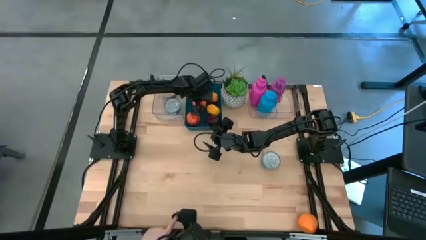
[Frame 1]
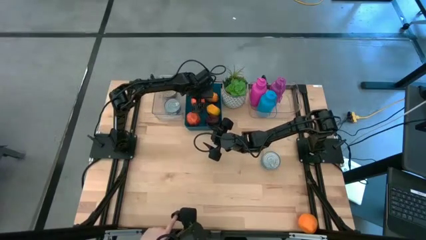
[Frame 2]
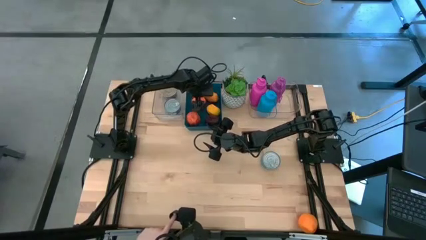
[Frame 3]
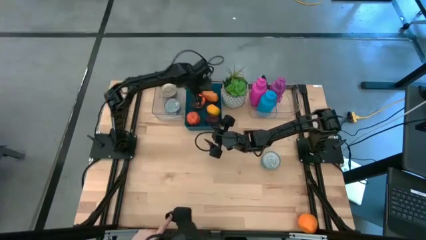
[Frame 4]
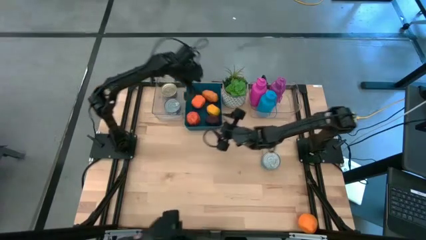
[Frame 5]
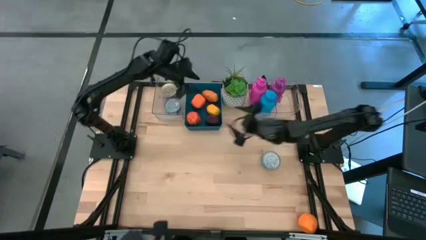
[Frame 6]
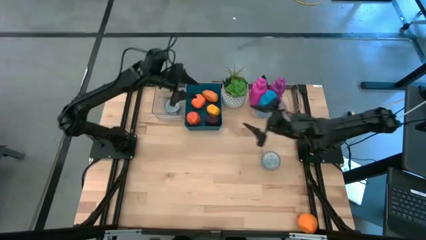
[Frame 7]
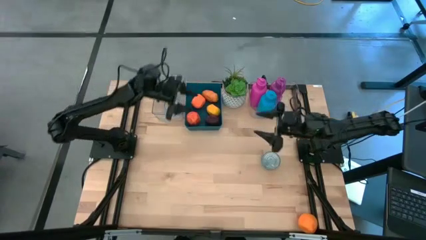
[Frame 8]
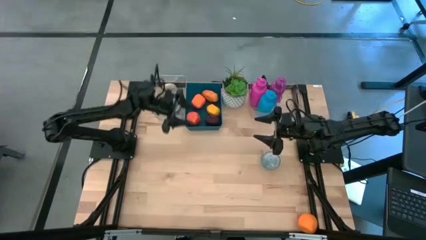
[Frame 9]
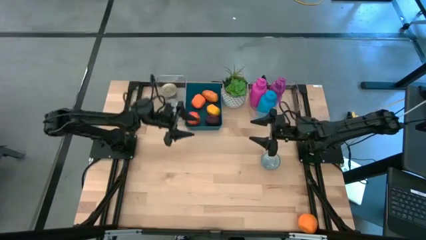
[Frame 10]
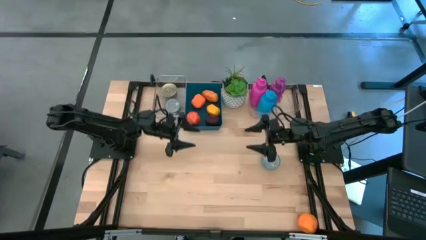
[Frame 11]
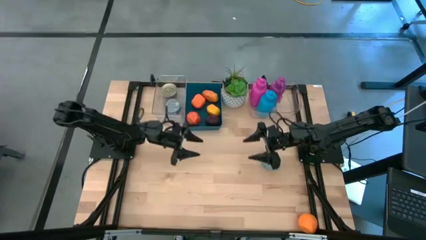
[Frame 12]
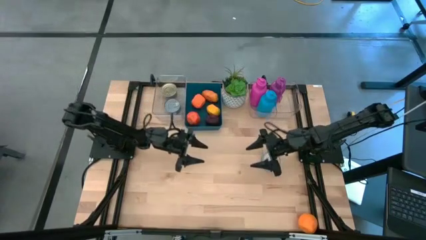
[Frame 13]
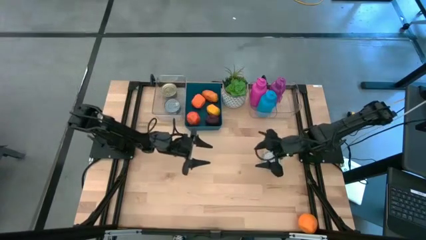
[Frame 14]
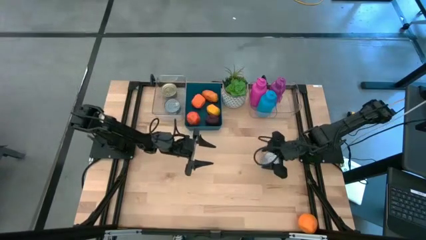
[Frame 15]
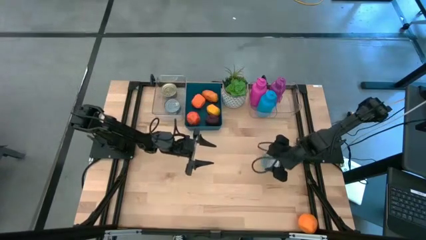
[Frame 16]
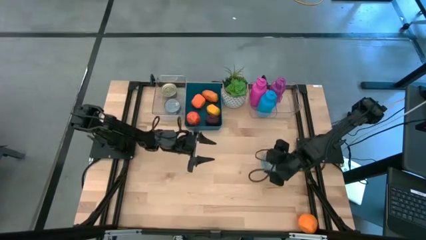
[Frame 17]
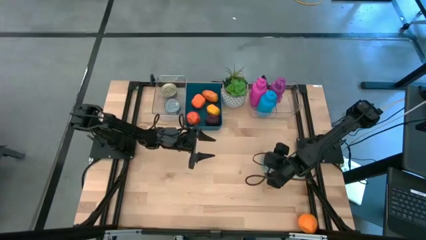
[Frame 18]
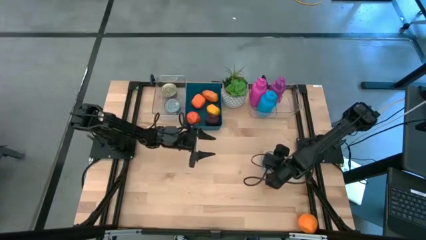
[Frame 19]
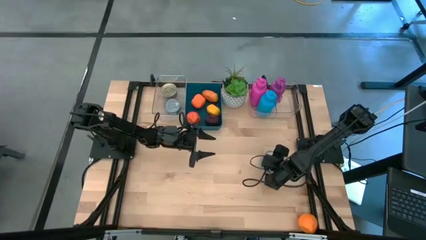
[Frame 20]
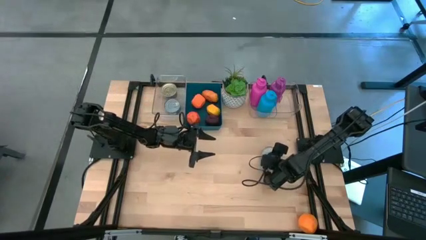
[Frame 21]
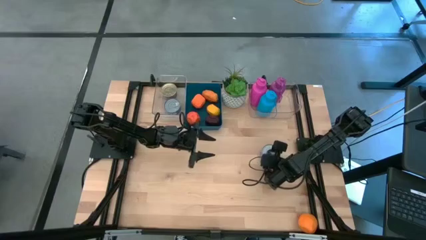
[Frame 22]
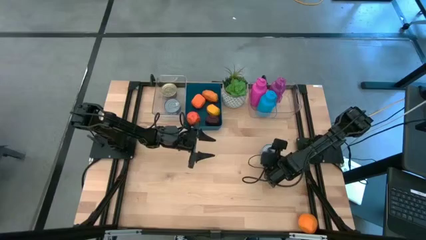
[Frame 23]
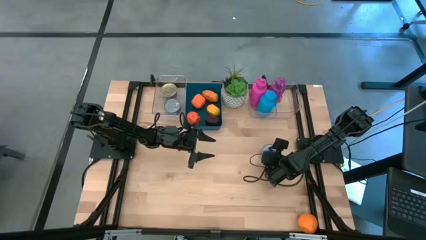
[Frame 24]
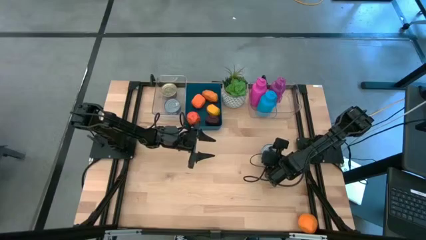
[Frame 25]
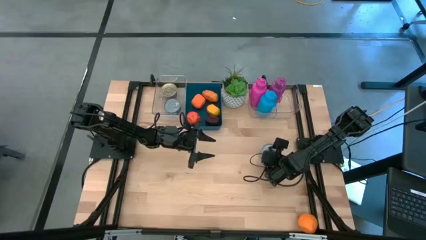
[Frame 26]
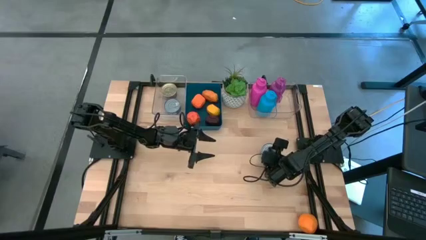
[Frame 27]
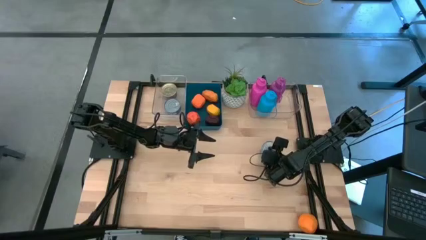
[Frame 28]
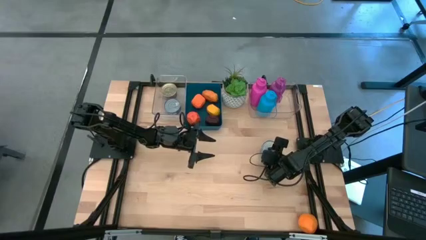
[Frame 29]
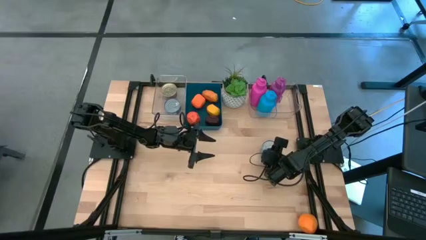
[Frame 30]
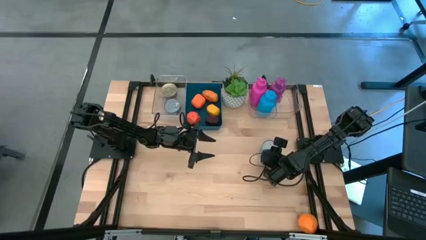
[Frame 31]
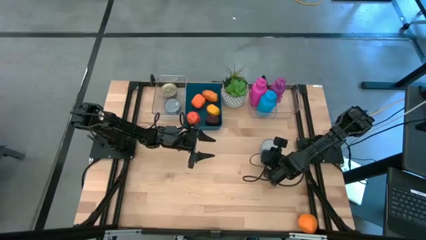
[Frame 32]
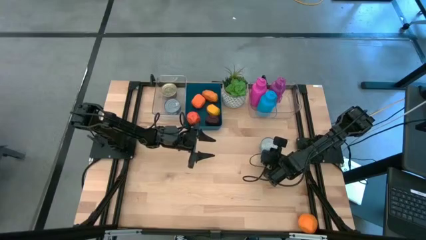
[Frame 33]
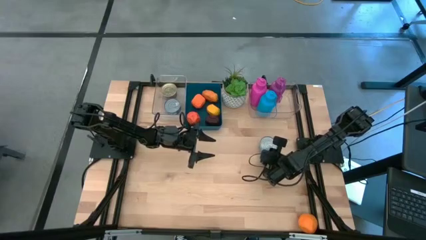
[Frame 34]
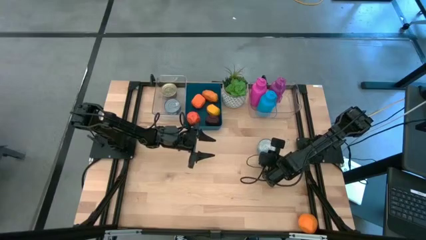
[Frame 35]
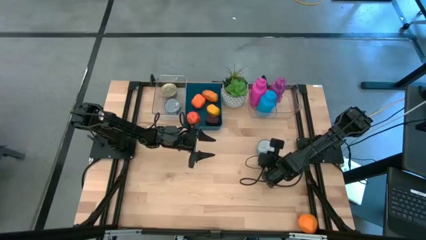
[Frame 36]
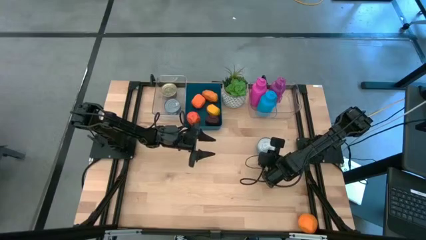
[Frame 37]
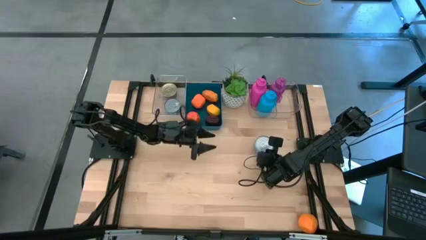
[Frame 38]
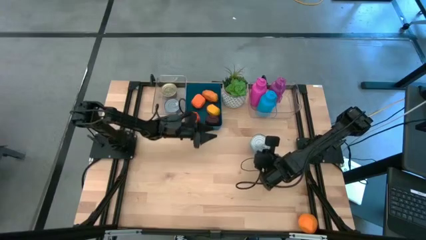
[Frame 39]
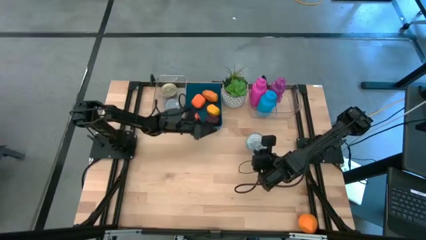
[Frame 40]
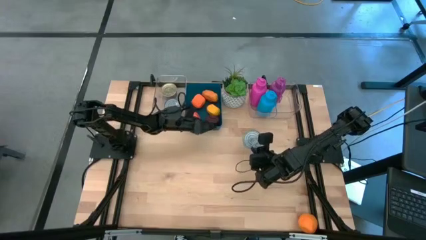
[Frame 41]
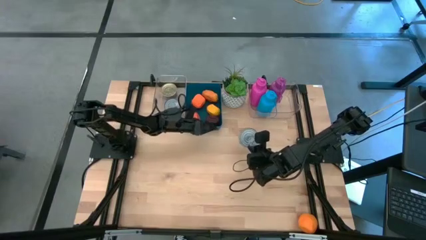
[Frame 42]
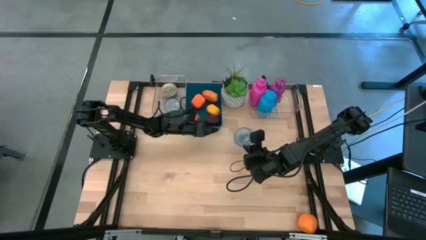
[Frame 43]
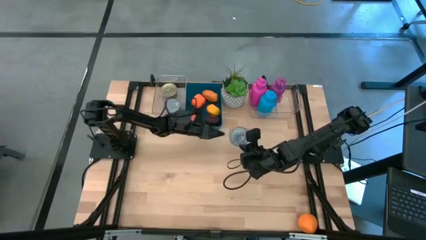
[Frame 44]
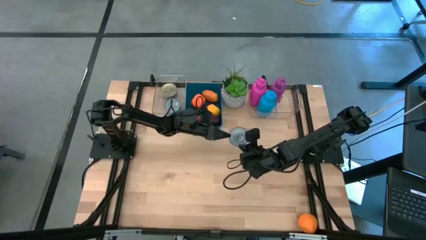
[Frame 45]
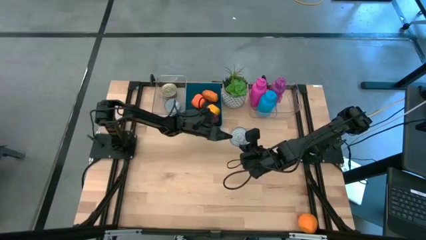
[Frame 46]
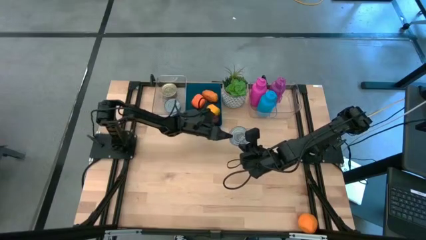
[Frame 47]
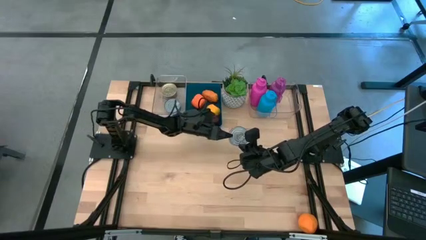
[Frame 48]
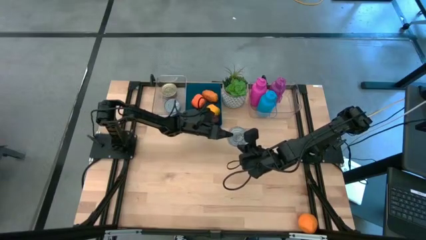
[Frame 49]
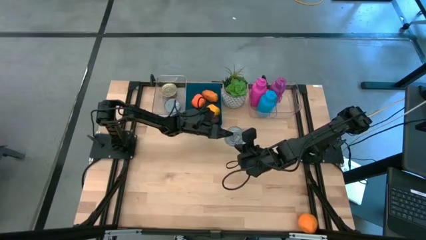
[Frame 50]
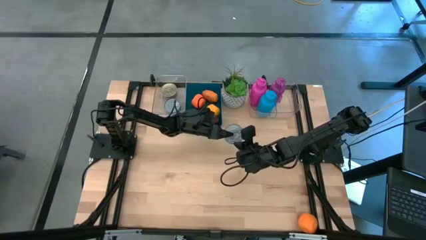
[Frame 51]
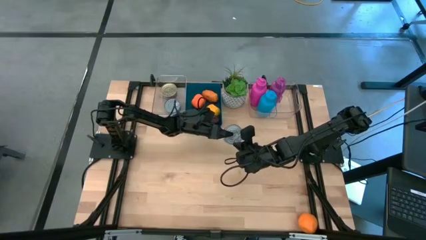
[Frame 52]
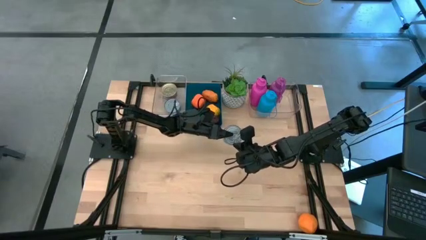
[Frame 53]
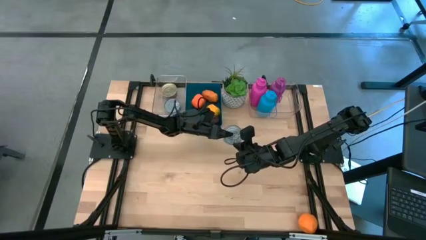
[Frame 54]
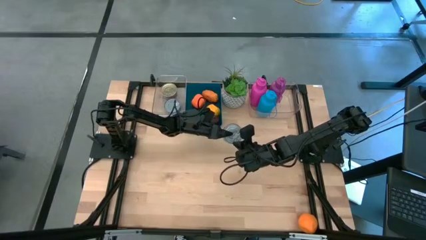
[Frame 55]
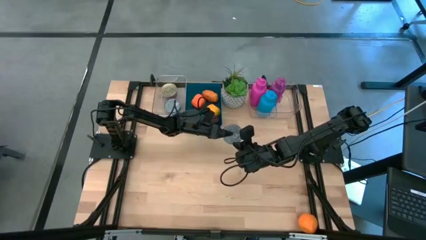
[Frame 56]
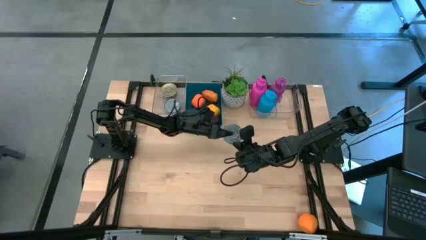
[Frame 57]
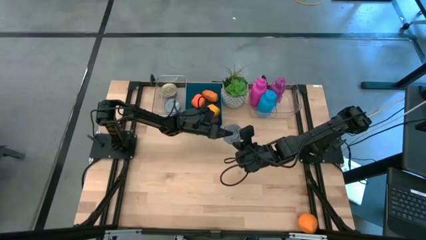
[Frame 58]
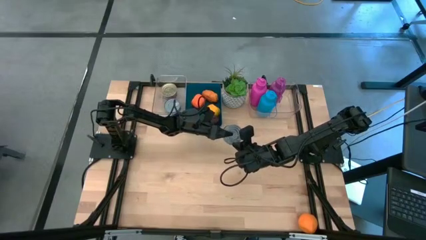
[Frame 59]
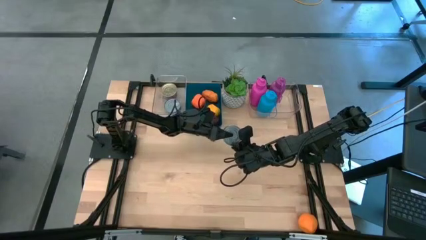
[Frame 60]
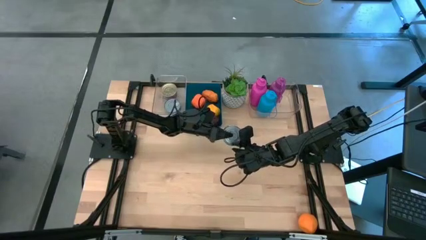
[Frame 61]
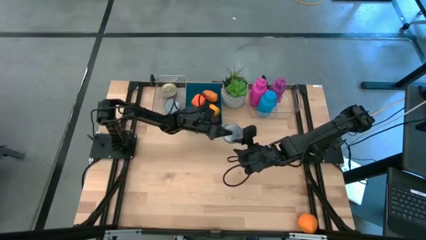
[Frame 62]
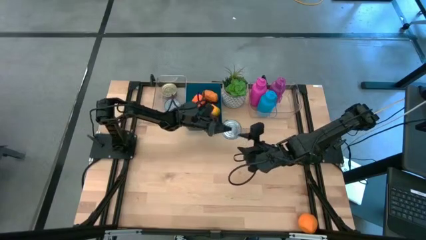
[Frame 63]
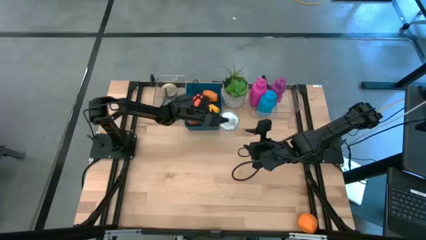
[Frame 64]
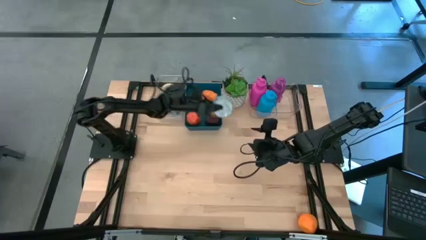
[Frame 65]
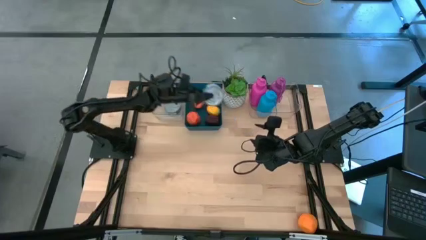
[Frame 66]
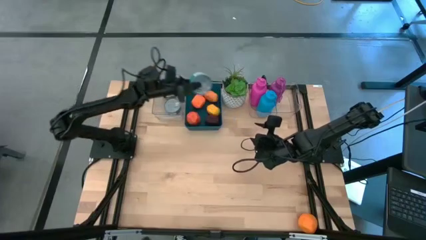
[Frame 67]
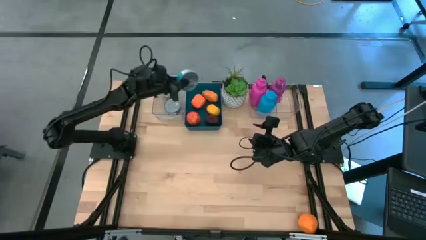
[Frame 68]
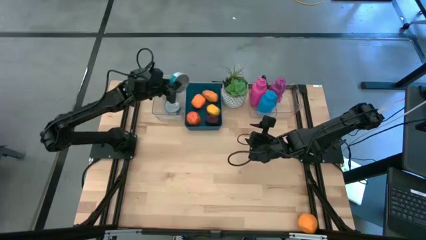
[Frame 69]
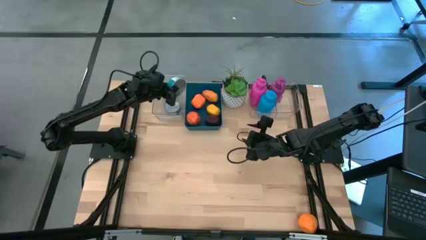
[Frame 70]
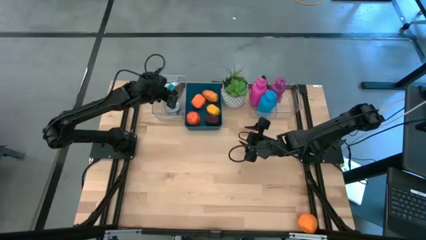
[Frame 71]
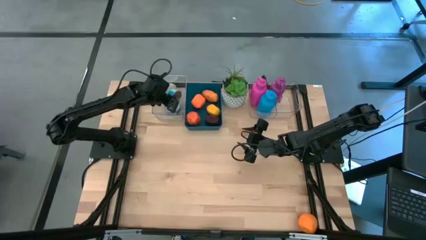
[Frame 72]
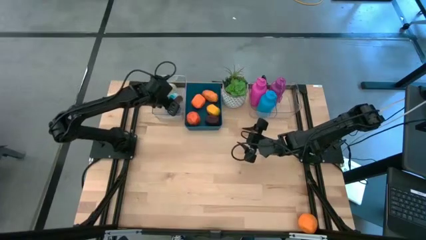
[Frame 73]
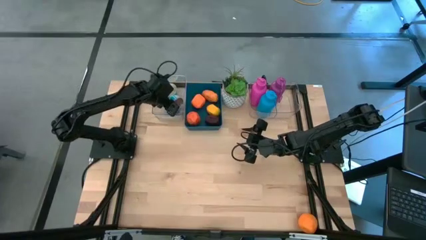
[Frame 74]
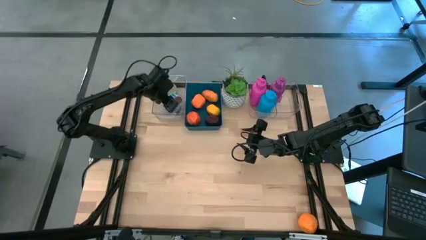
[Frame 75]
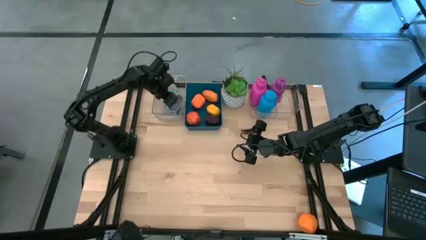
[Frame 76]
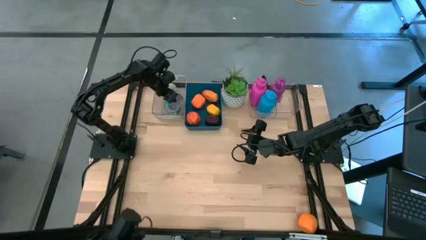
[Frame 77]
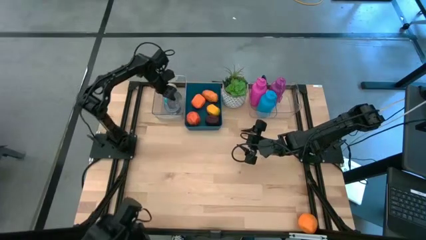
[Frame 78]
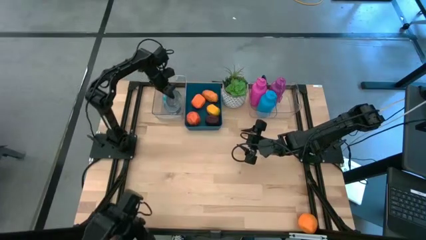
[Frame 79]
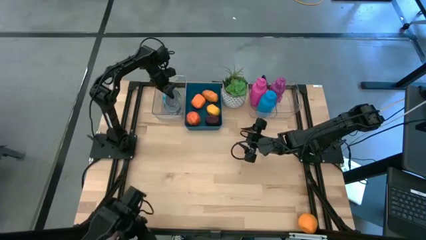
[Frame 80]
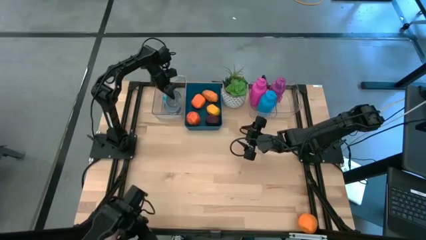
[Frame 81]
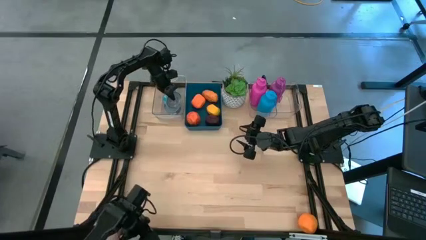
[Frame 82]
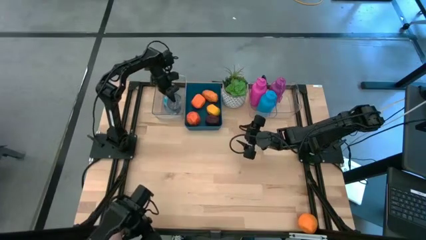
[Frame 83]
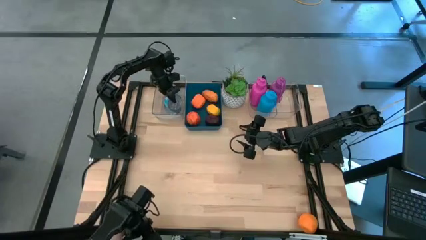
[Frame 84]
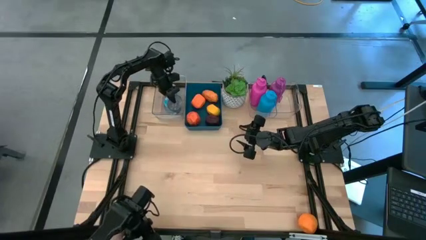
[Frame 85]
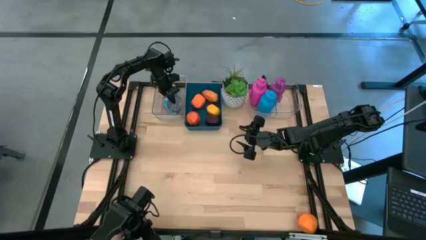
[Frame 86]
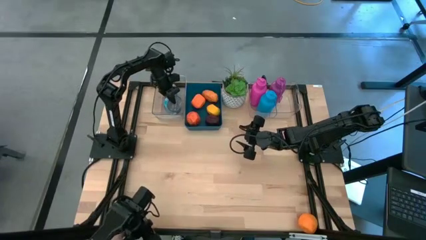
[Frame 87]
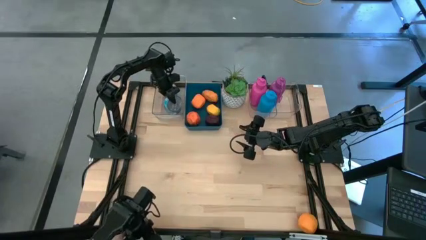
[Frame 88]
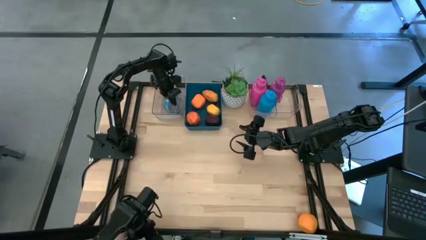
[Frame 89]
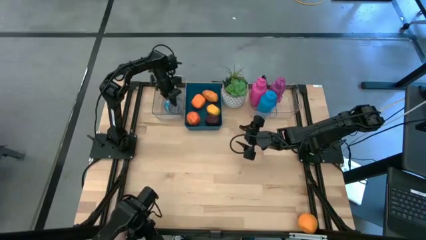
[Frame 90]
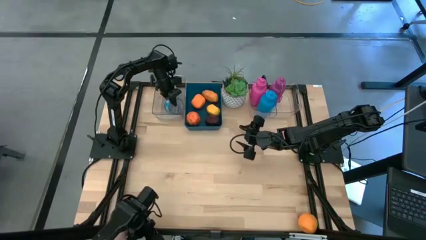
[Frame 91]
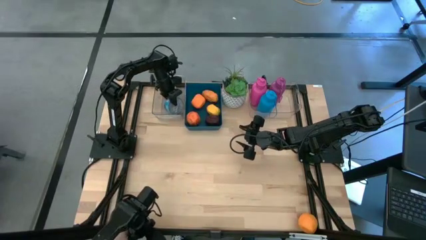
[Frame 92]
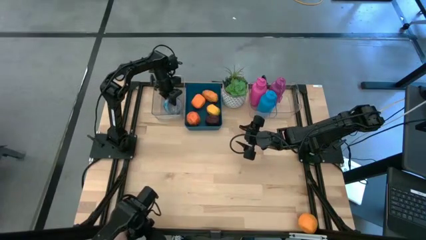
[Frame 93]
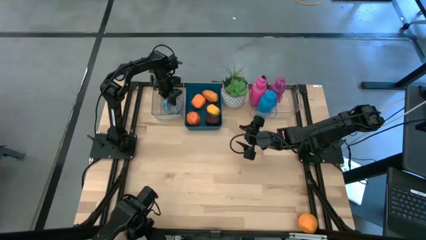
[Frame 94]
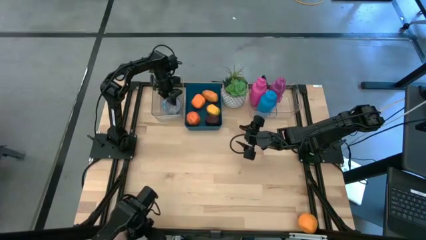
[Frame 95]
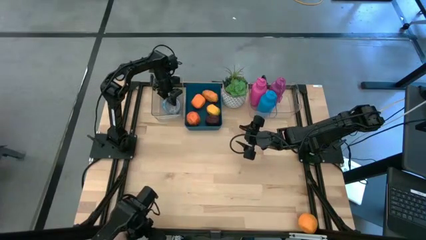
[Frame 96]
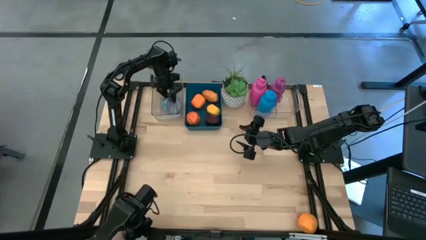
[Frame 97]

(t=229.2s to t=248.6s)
Task: Pick & Place Food Item
Stack the light blue tuna can on top of the blue tuna can in the transparent bin
